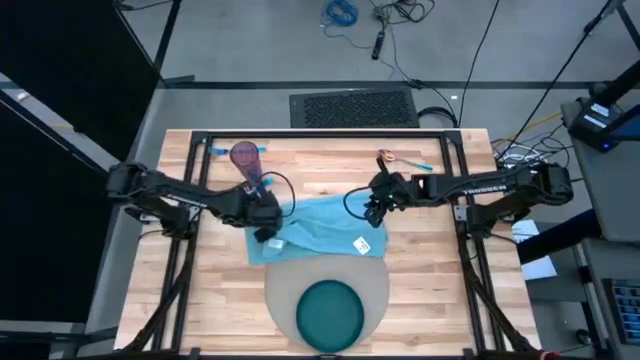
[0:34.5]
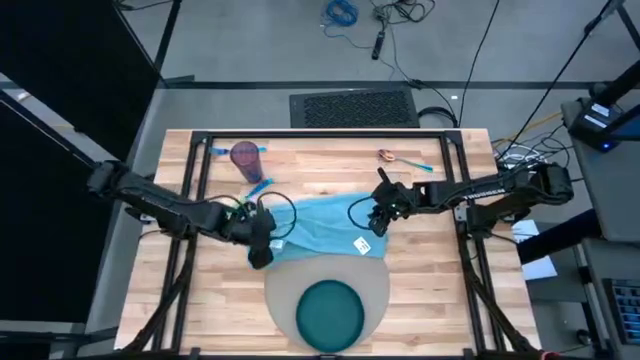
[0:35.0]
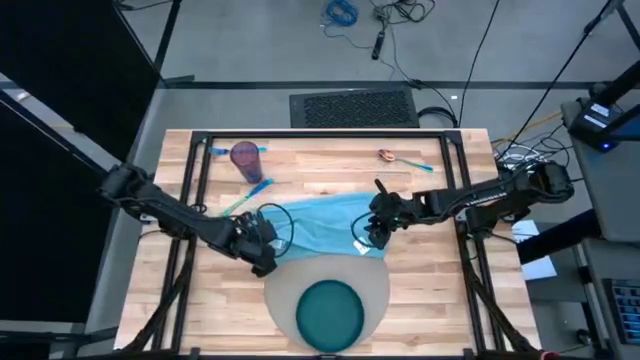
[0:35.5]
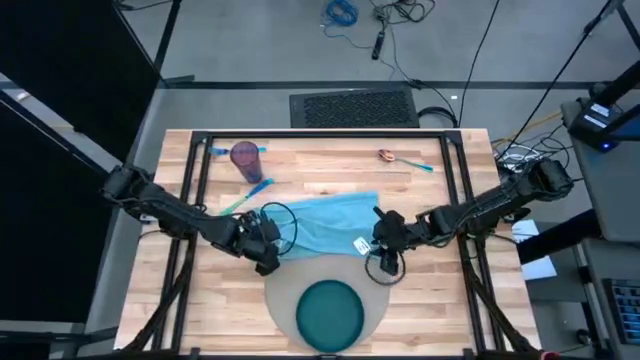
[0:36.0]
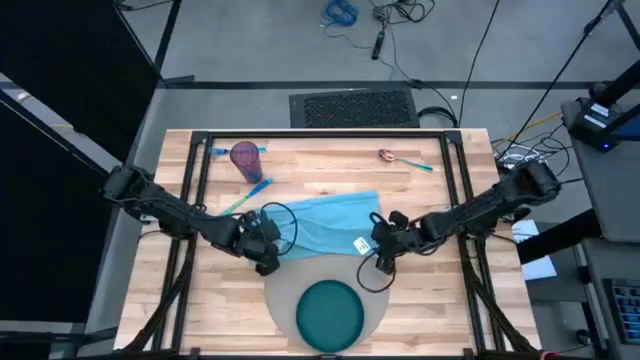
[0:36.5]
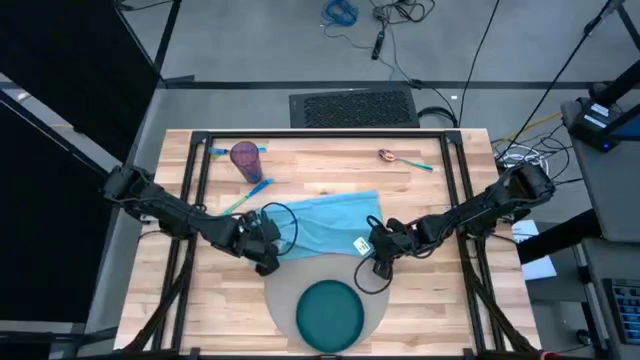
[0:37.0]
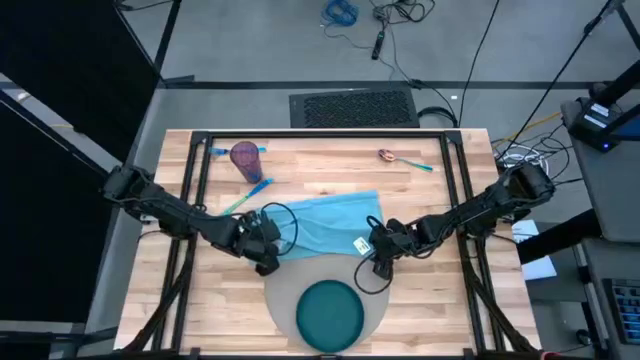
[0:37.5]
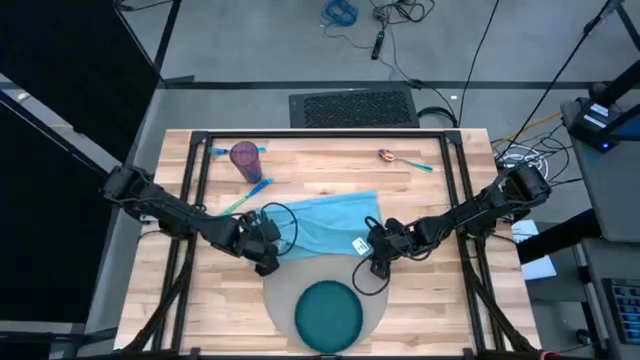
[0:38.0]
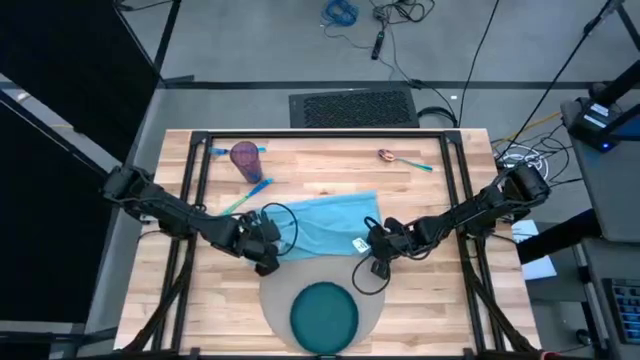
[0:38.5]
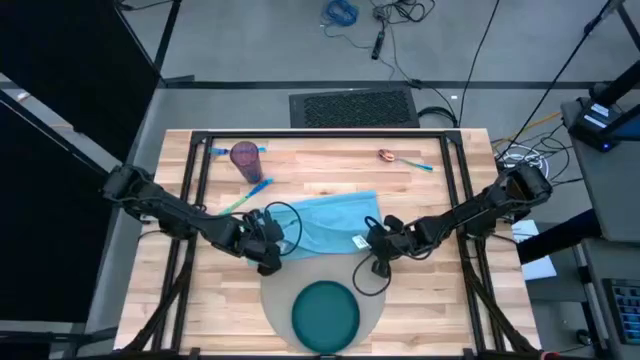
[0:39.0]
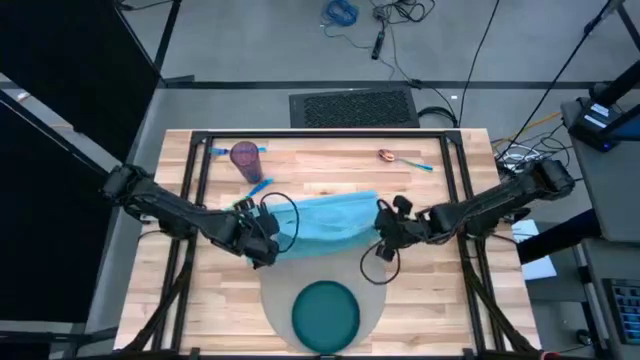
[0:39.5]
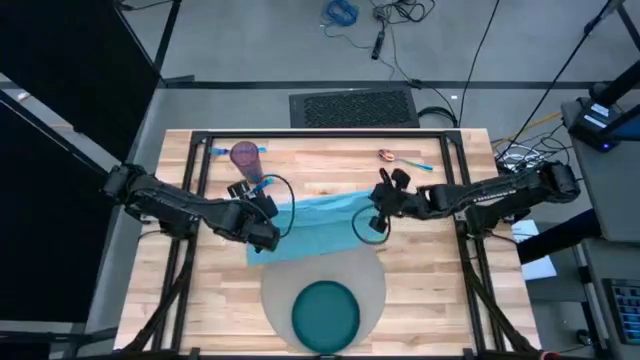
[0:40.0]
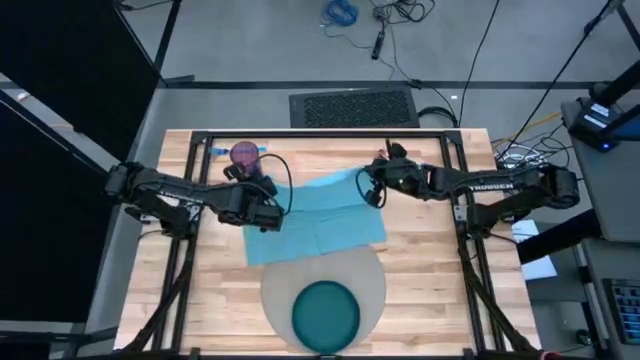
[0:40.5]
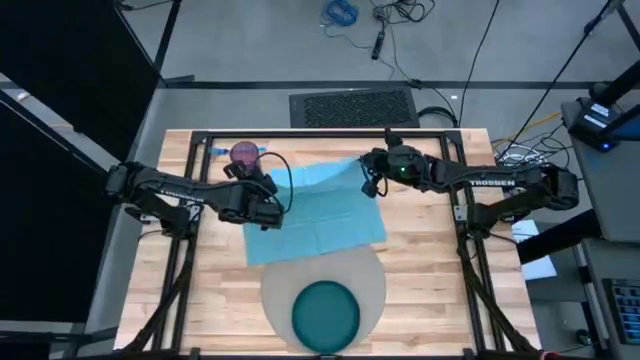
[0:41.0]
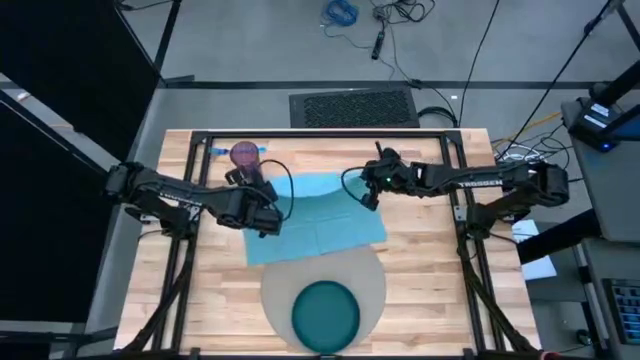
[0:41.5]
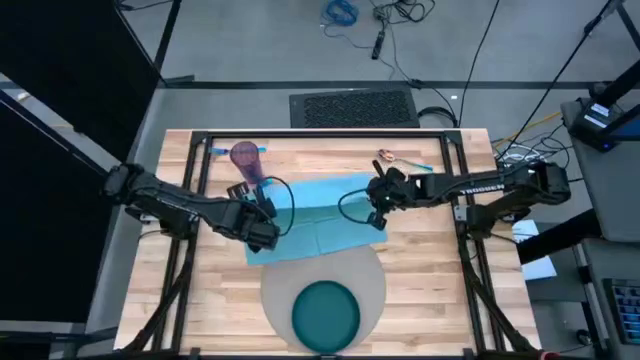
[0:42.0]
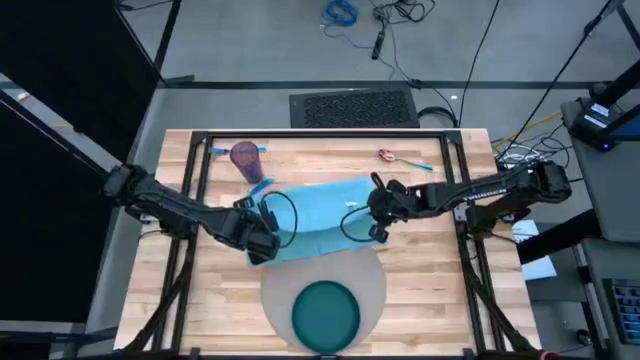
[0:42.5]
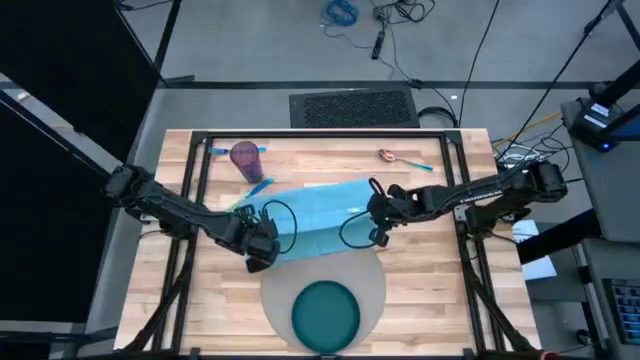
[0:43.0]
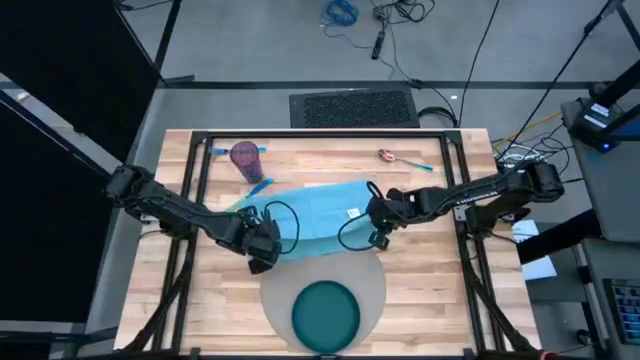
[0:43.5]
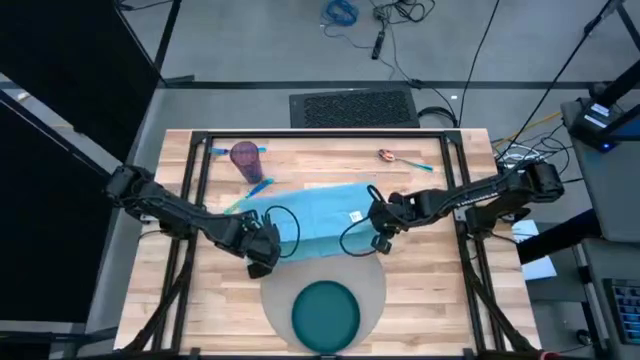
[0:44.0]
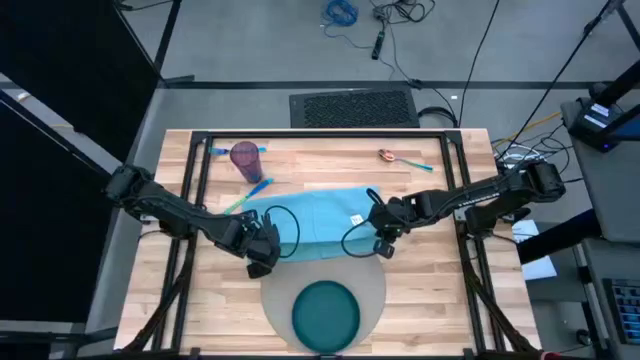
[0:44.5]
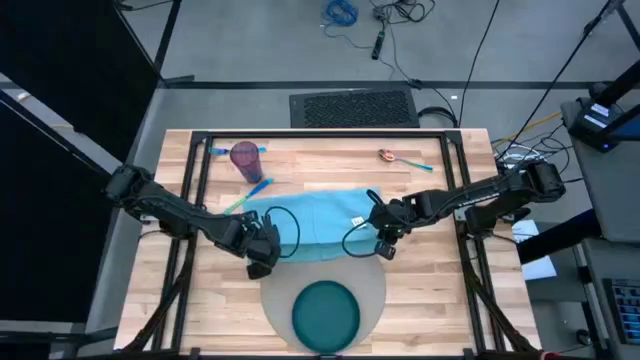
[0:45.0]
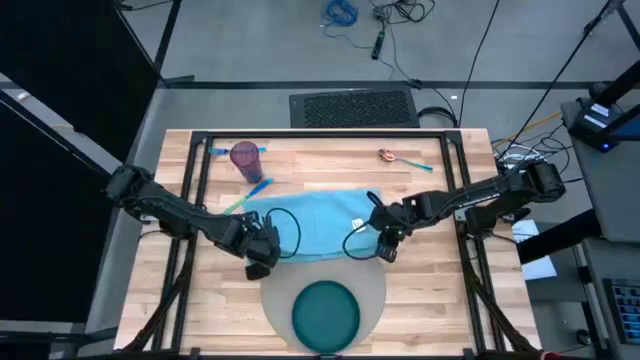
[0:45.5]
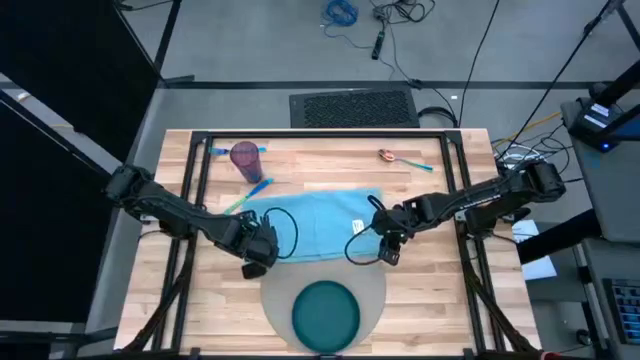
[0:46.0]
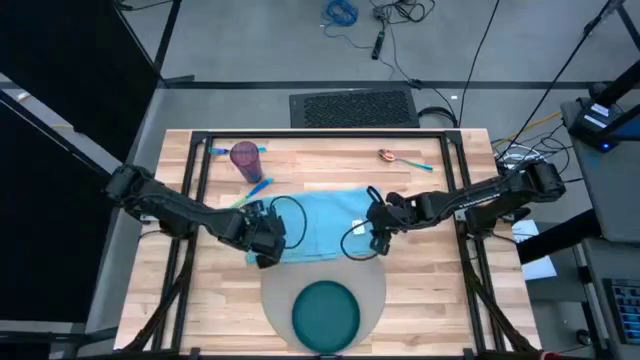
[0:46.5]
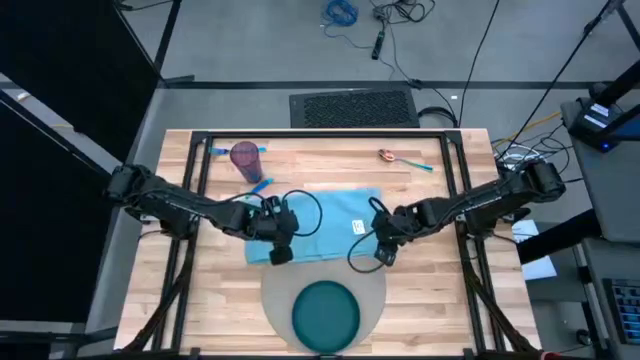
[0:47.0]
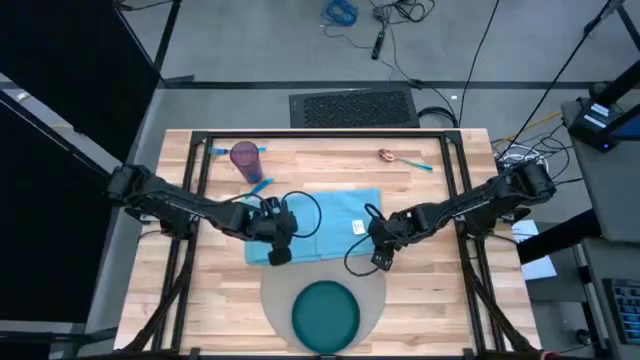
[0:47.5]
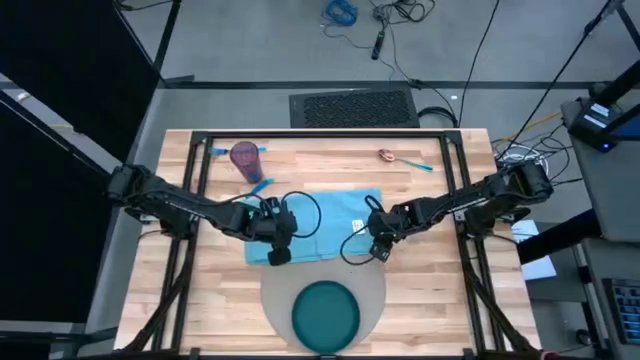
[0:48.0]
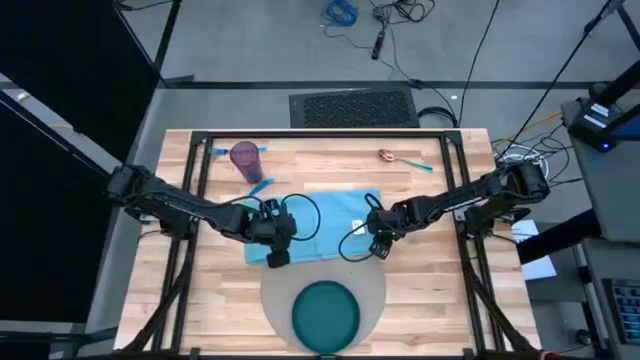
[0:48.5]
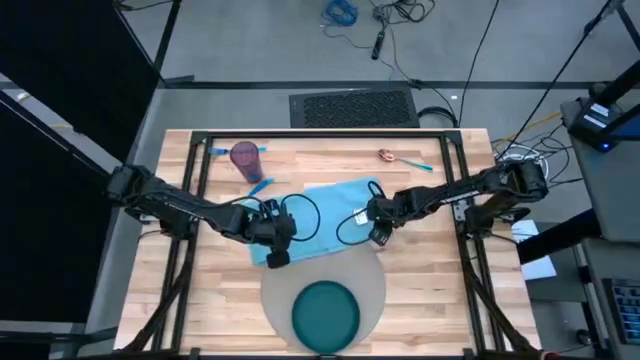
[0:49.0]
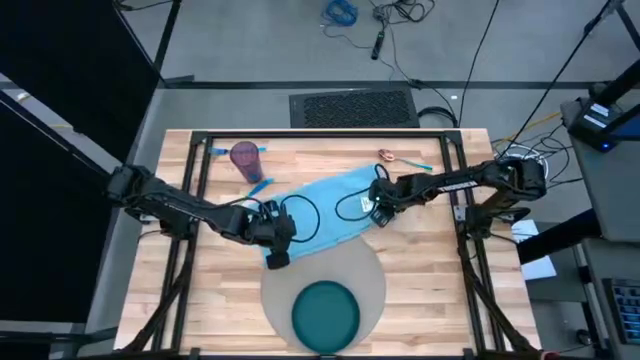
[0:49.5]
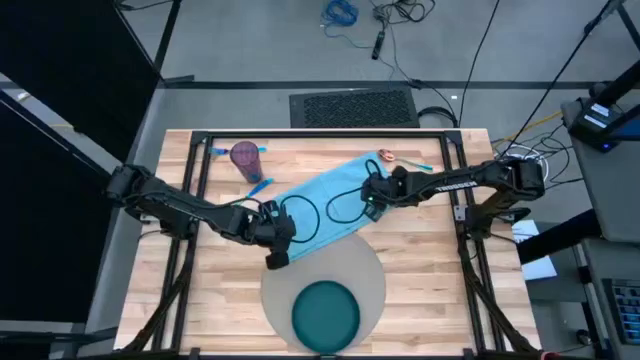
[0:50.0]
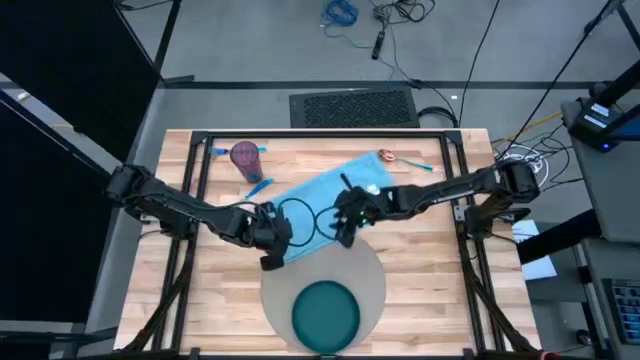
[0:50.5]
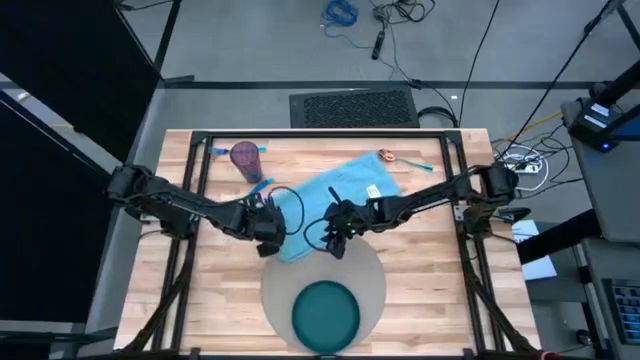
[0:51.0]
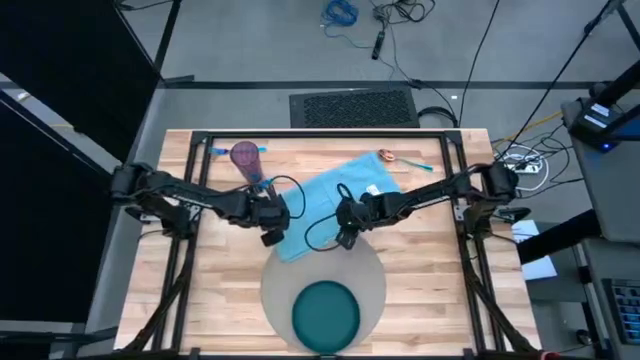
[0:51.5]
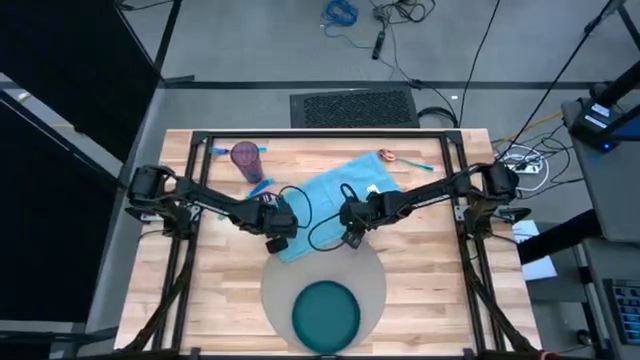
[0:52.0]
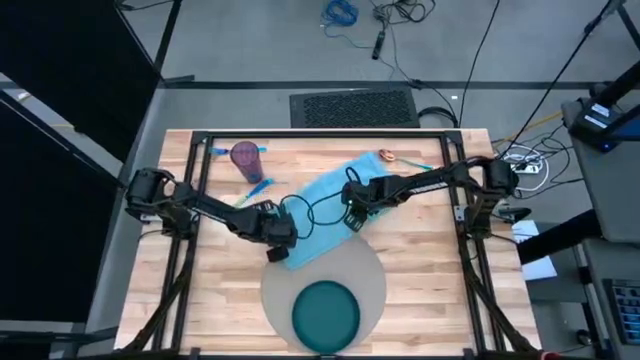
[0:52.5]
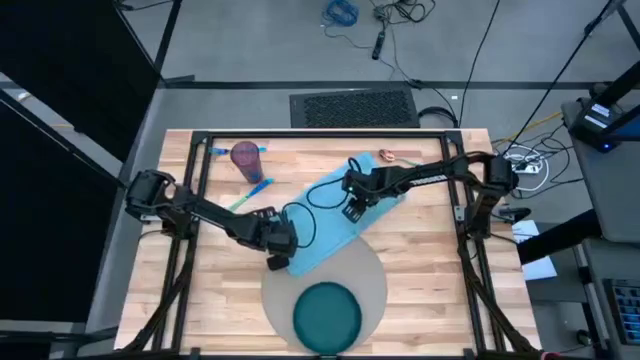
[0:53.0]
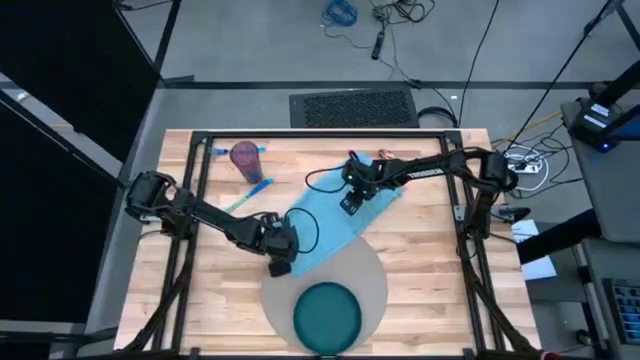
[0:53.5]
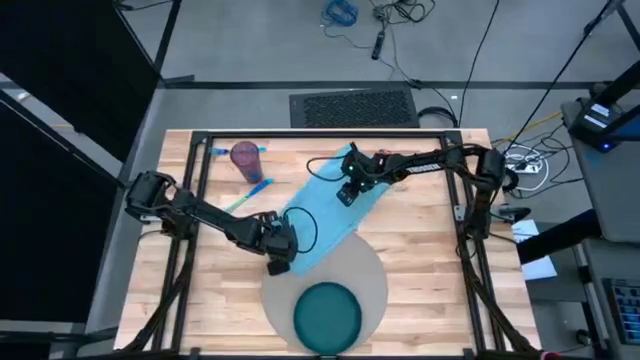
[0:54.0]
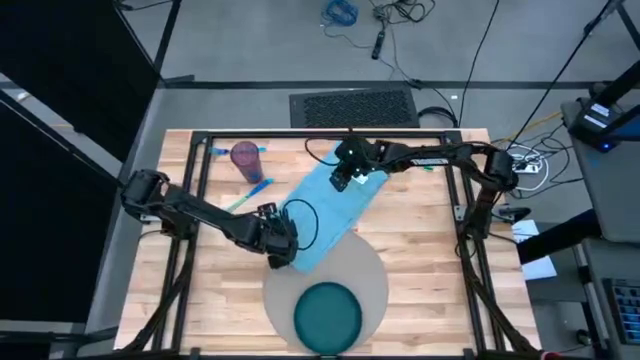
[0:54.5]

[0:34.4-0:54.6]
Task: Set table place
Fold the blue napkin
